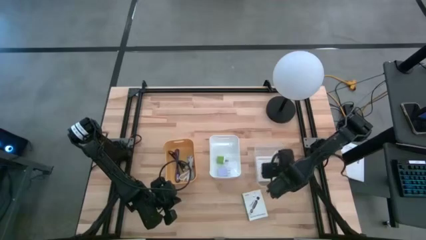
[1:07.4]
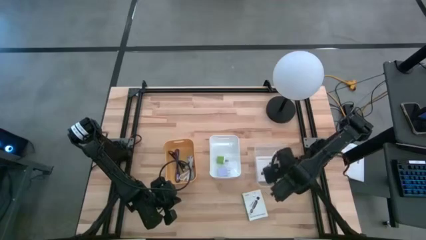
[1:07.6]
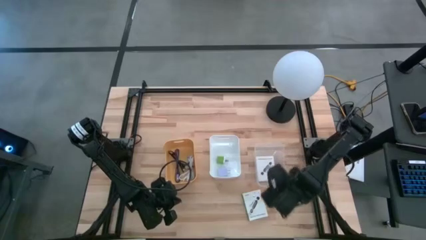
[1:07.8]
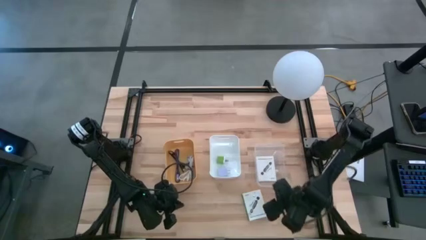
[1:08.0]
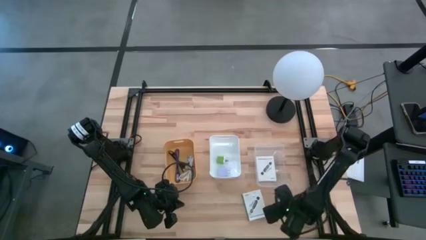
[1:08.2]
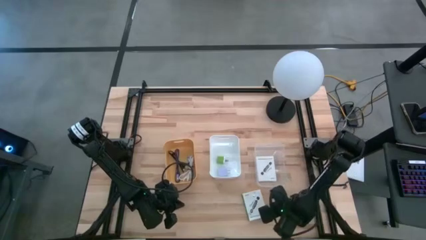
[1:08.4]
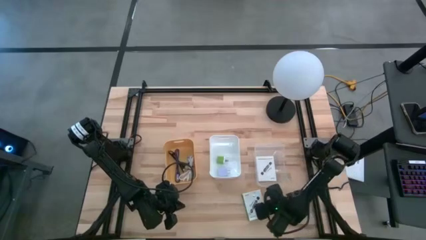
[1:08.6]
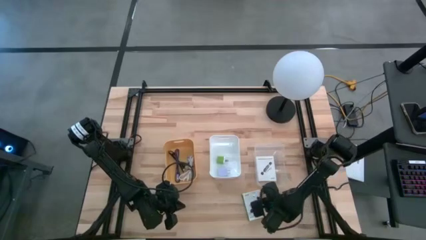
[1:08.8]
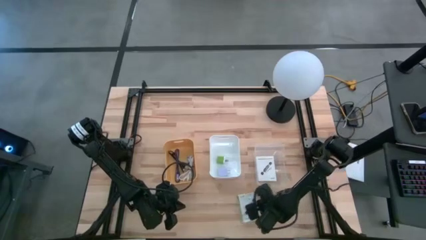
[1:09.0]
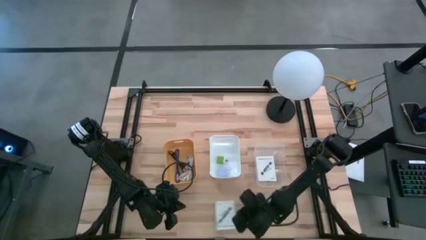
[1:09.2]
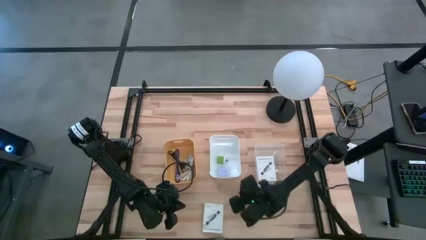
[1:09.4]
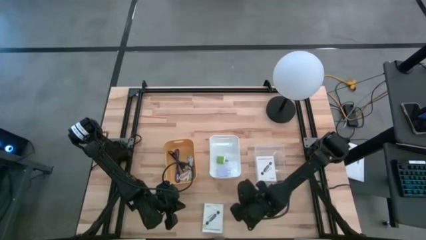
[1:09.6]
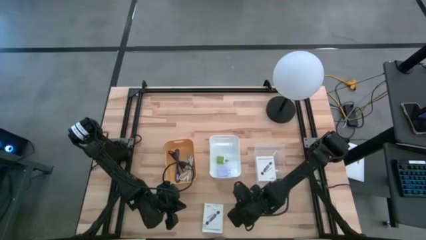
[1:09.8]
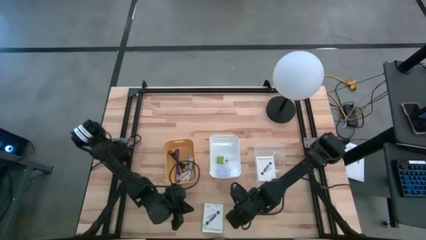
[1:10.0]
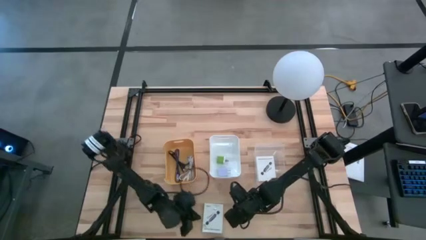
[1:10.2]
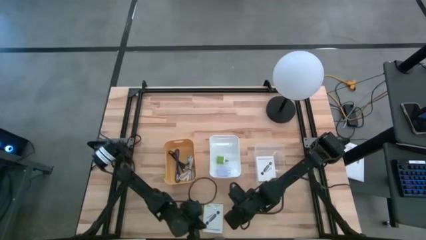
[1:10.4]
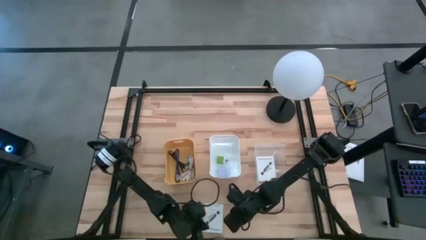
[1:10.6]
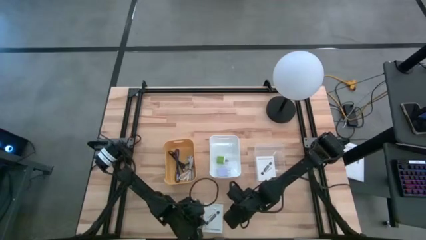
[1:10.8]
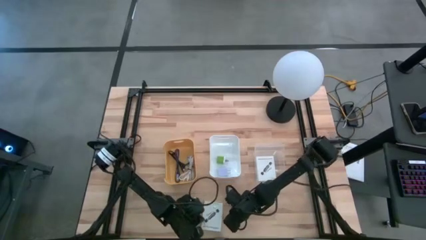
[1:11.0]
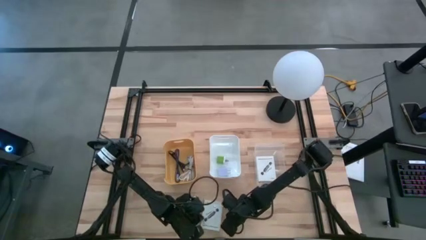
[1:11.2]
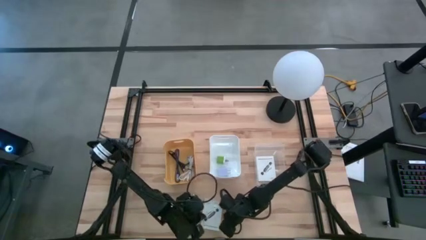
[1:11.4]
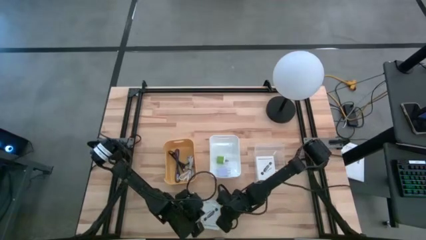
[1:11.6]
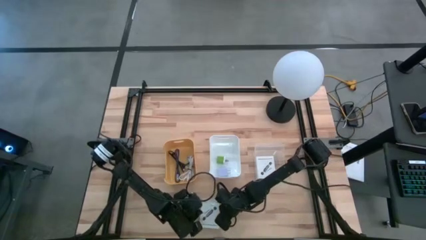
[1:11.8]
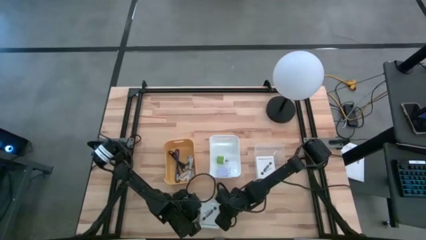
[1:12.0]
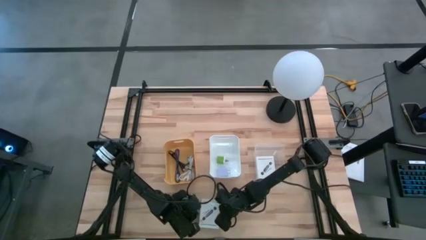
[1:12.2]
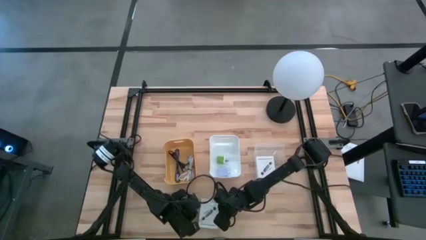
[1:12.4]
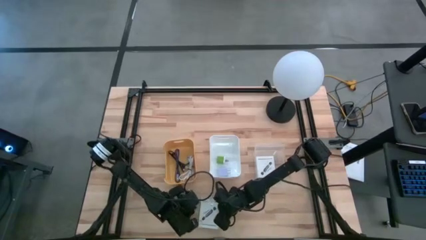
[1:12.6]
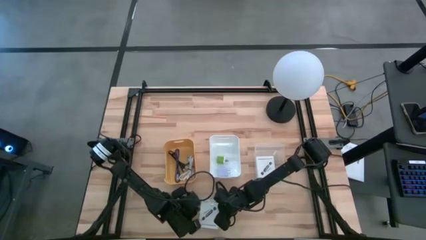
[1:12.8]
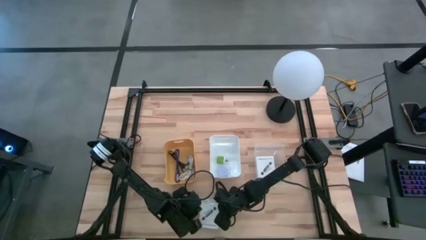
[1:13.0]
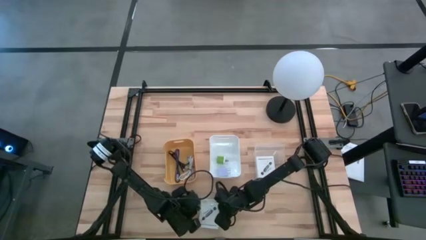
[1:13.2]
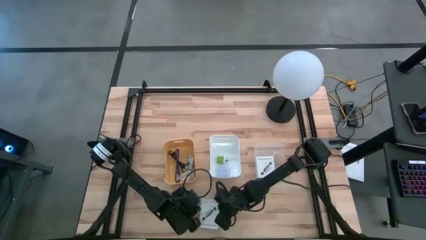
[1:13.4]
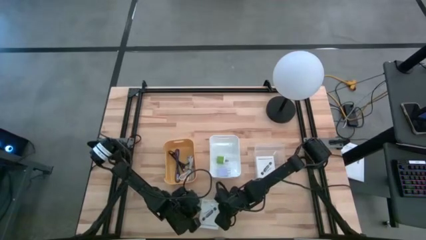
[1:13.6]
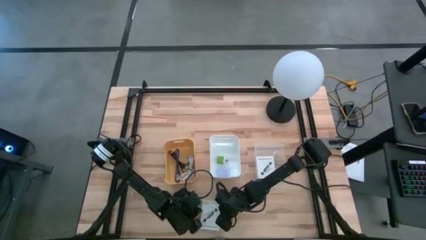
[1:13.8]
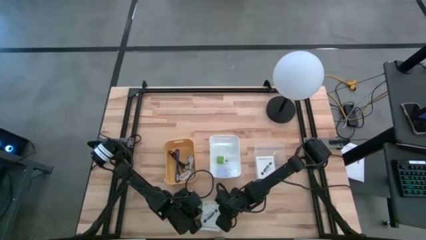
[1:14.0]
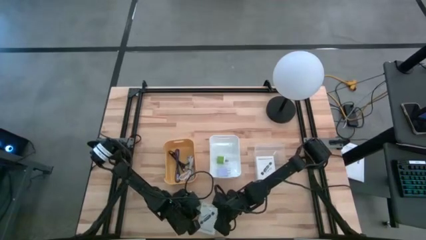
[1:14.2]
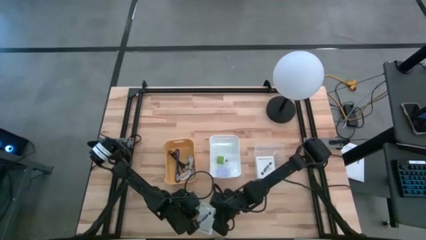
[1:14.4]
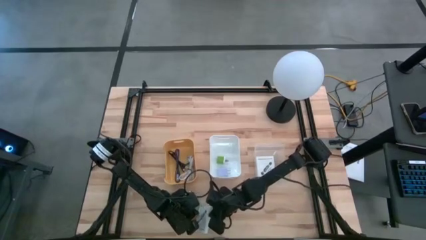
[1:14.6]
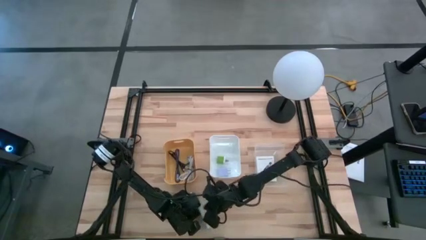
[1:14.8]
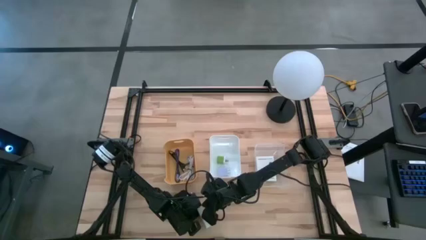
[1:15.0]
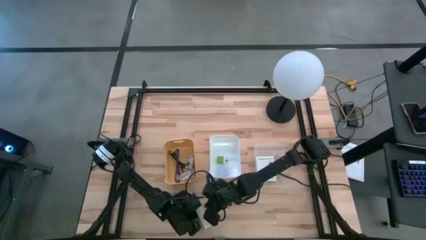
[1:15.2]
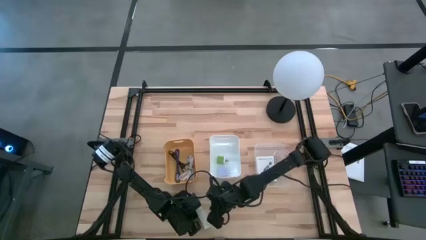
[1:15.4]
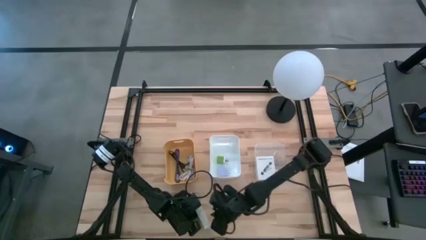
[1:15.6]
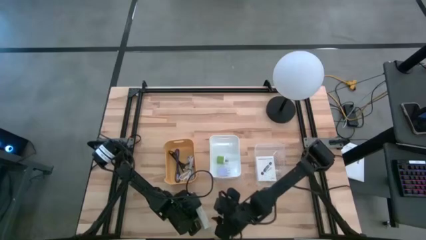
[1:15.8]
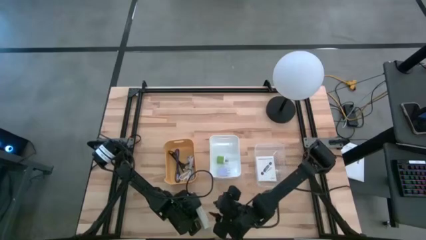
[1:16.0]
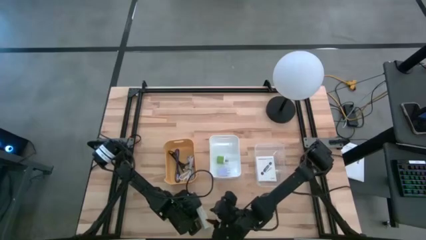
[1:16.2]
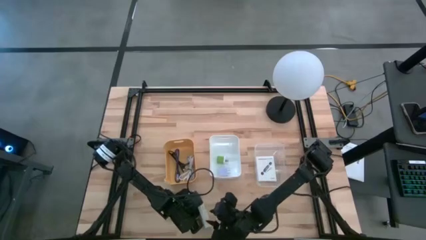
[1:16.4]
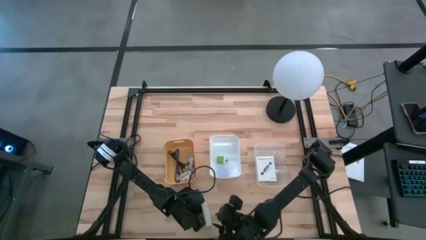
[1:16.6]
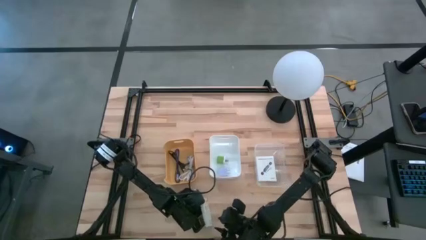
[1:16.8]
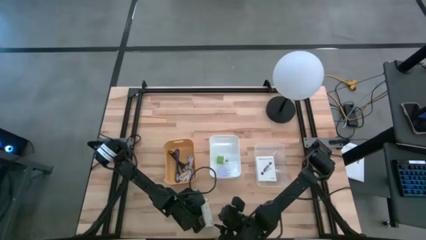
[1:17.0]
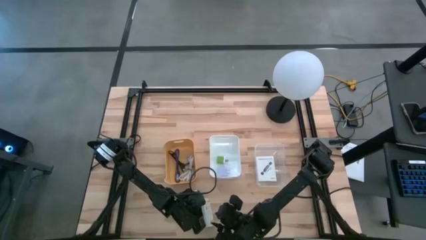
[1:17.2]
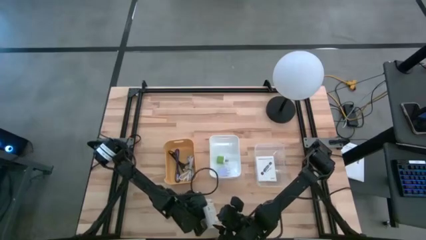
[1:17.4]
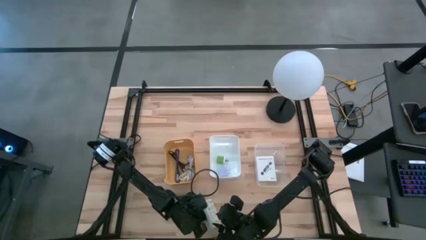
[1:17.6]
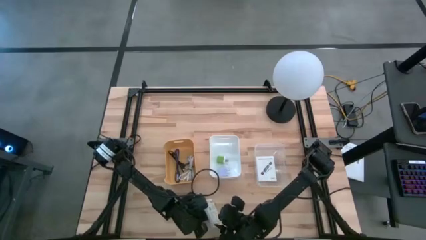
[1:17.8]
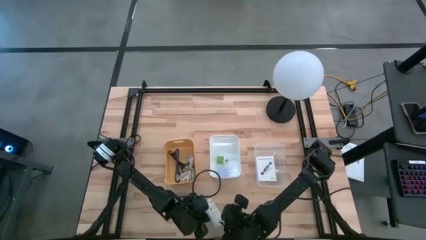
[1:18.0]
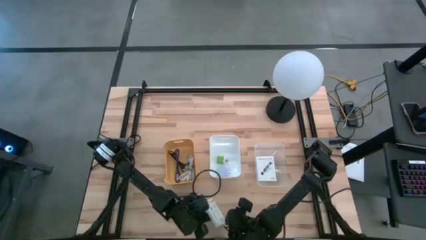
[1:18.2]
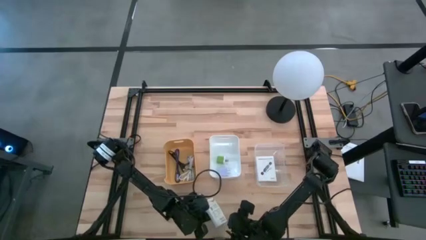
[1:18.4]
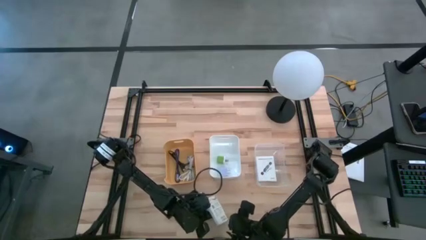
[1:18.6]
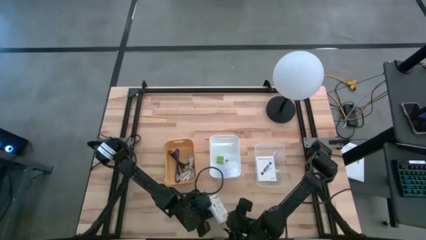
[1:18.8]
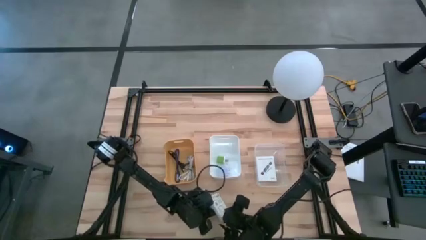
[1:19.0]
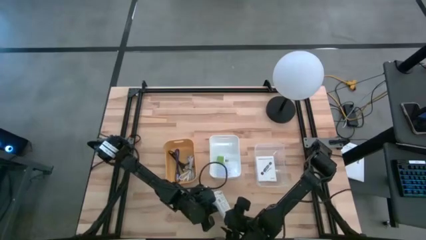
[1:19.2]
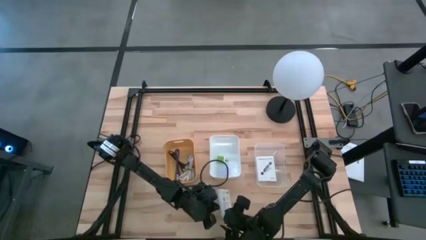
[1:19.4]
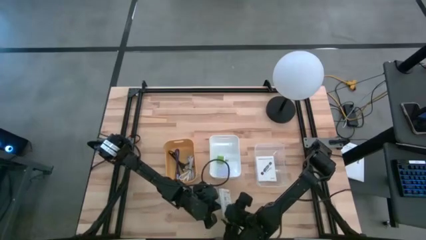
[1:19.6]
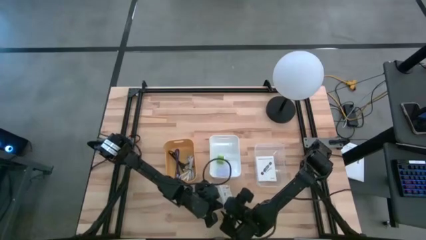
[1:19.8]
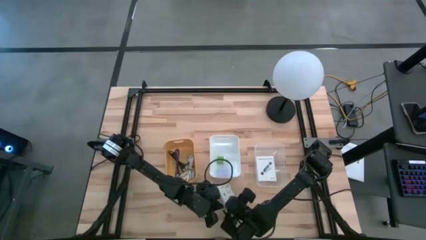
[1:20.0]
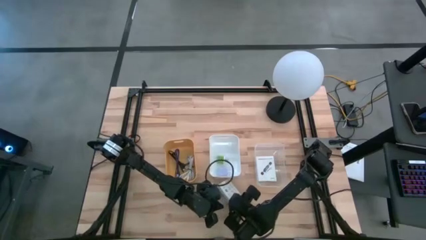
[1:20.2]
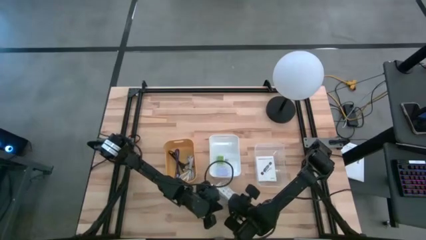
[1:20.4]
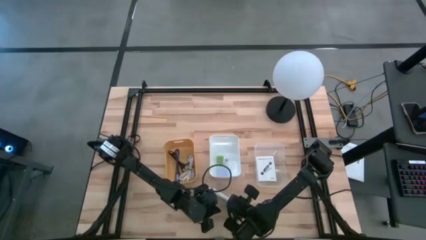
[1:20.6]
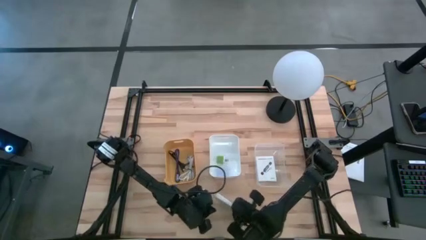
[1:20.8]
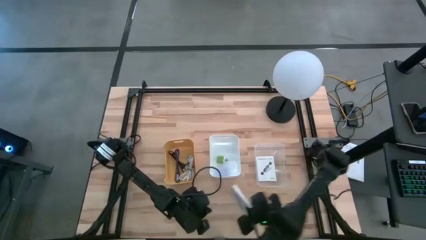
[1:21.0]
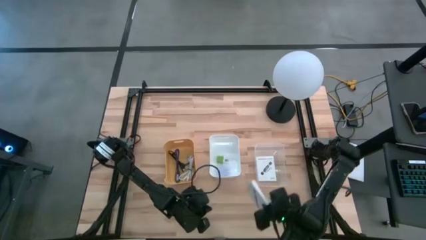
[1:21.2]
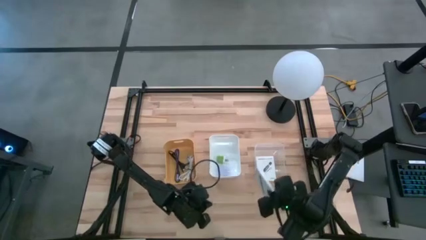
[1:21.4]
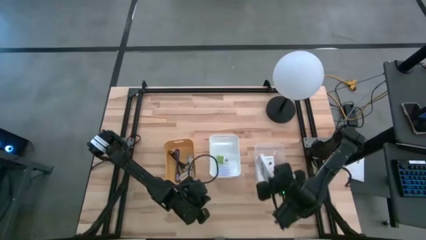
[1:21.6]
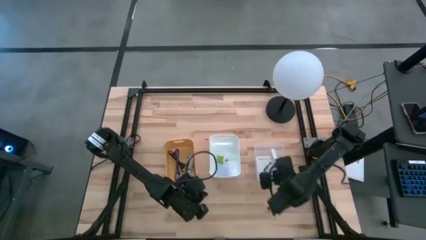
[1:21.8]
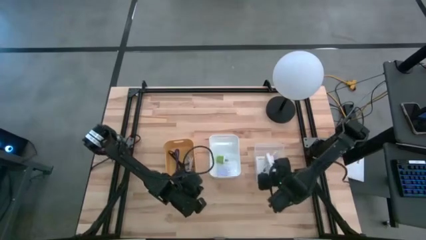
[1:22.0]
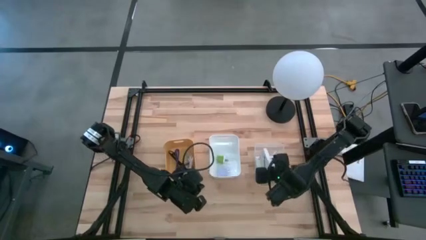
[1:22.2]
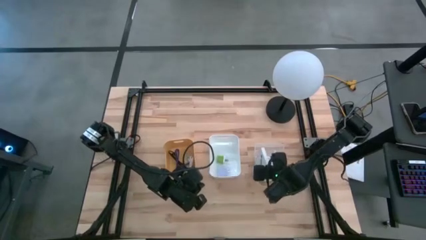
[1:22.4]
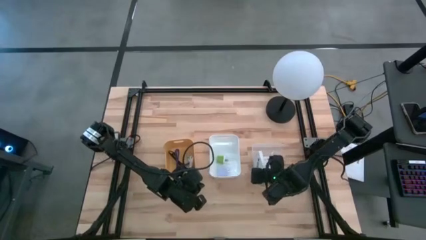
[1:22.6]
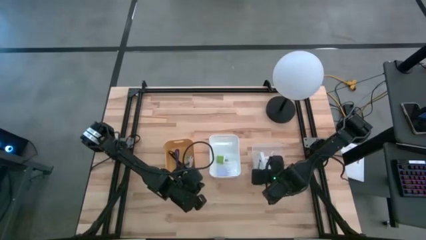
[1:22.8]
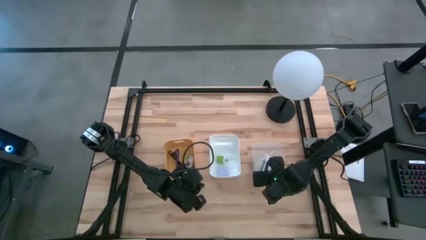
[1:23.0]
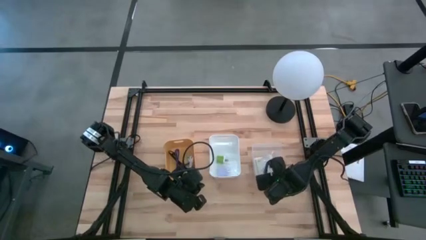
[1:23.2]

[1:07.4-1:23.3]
Task: Pick and place items into bin
Put the white card reader box into the transparent bin

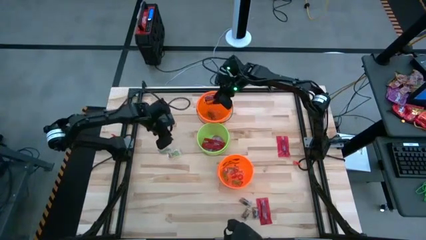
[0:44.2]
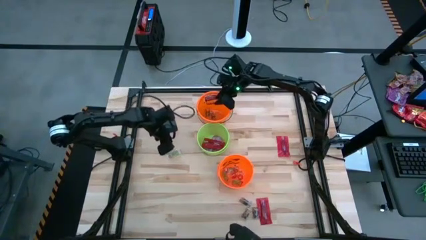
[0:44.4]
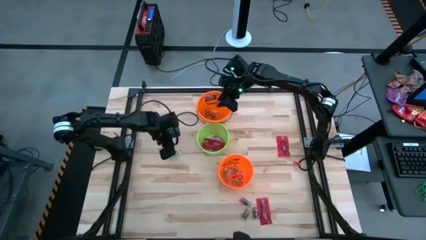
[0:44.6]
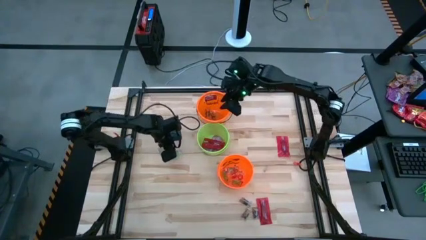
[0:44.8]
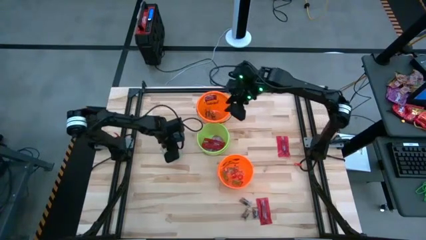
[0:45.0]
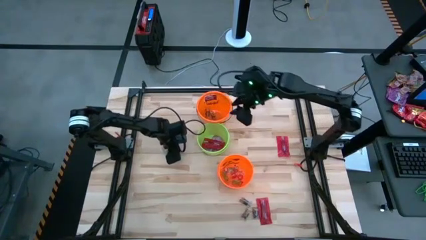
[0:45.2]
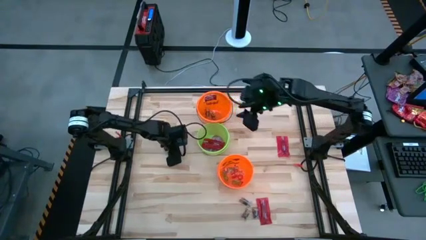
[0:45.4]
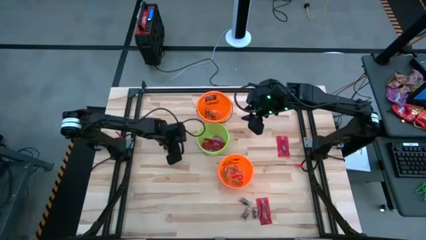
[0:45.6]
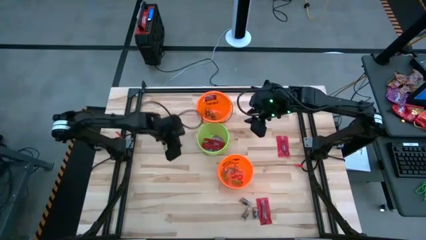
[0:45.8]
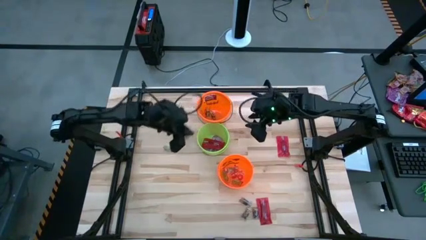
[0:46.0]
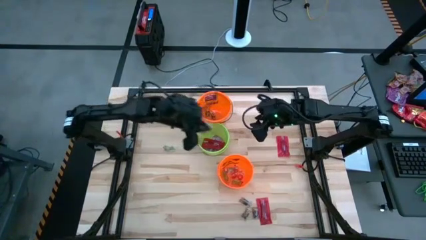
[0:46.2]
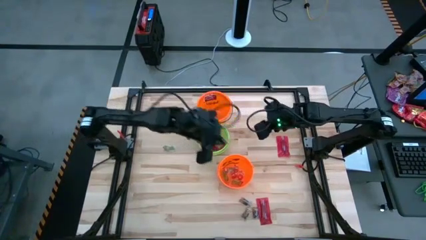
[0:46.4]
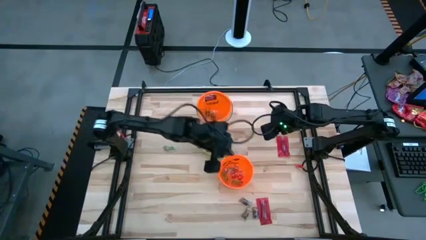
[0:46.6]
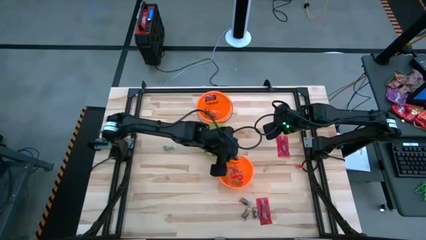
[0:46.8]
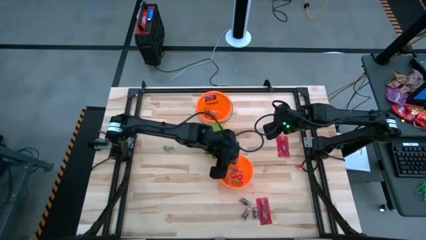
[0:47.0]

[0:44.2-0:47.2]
Task: Sort candy by brand, put in halloween buckets
Put the green gummy into the bottom orange bucket
